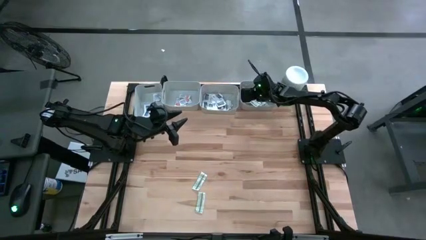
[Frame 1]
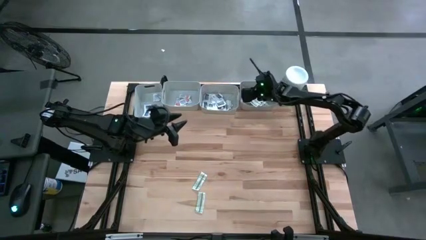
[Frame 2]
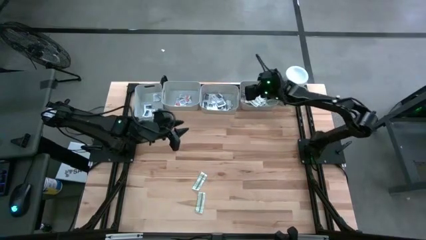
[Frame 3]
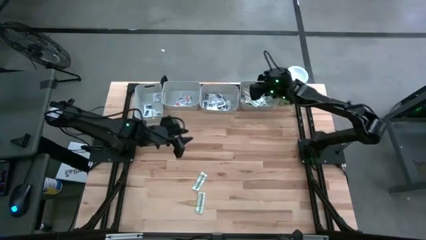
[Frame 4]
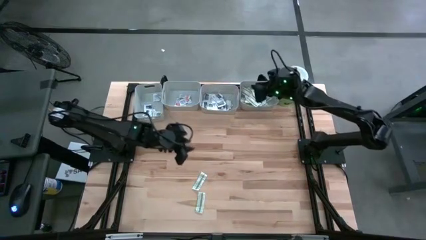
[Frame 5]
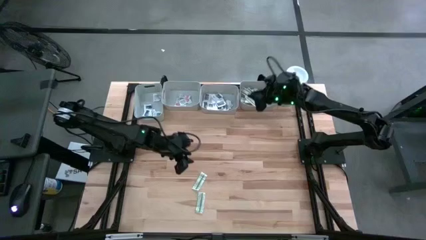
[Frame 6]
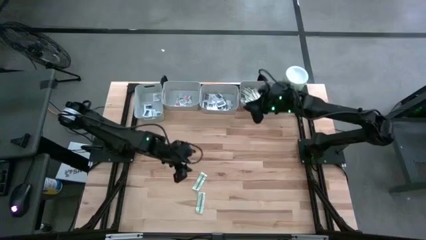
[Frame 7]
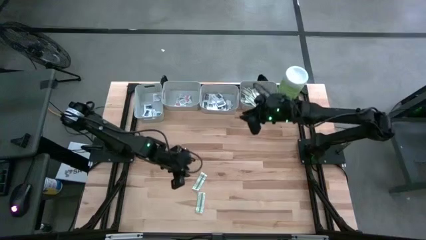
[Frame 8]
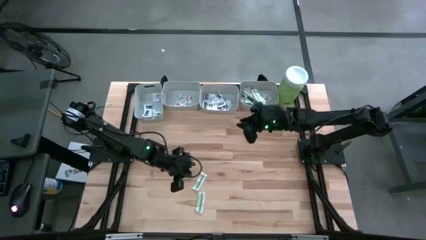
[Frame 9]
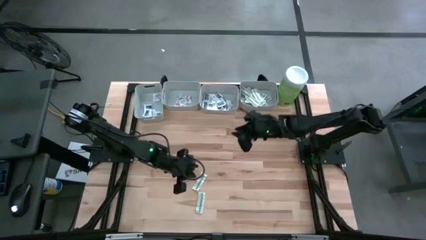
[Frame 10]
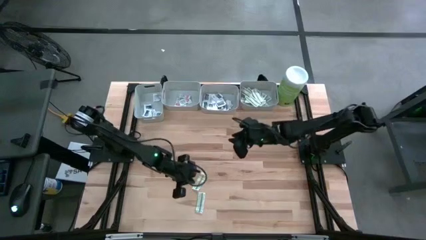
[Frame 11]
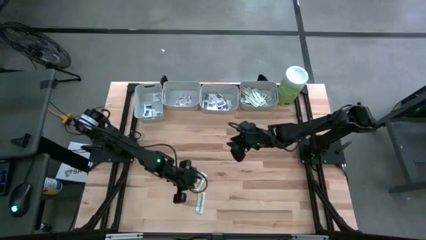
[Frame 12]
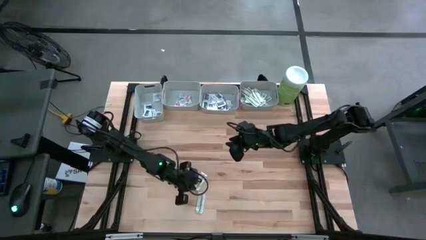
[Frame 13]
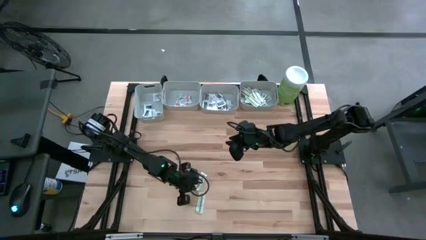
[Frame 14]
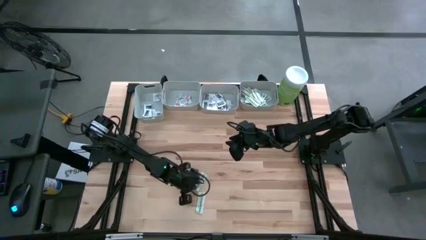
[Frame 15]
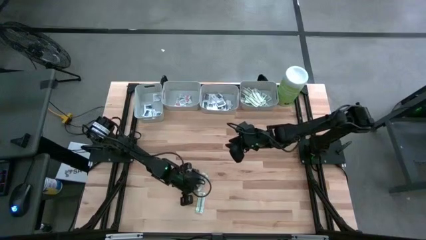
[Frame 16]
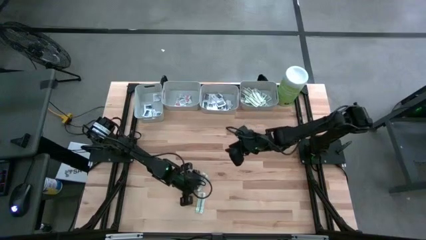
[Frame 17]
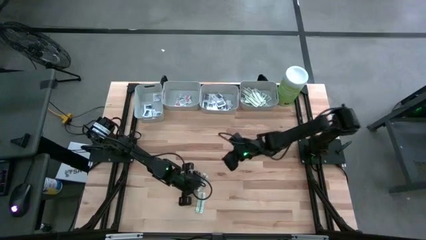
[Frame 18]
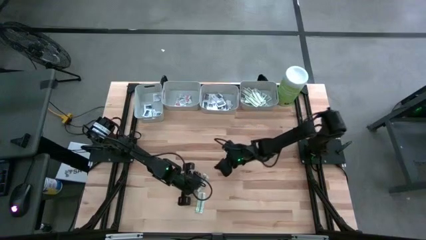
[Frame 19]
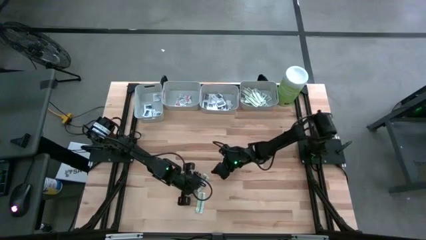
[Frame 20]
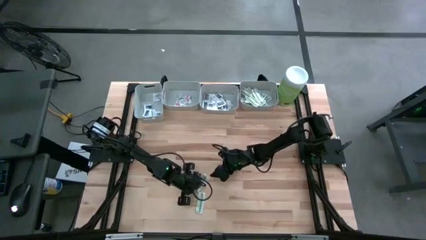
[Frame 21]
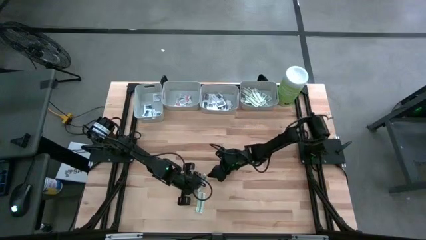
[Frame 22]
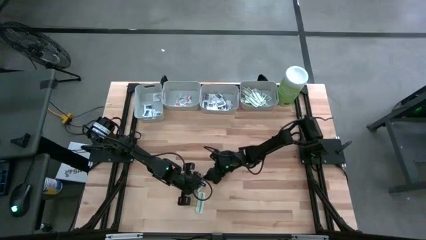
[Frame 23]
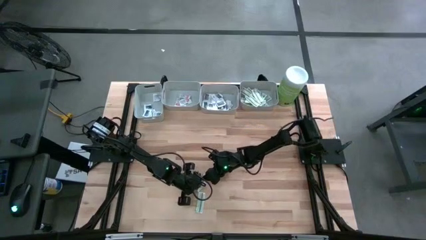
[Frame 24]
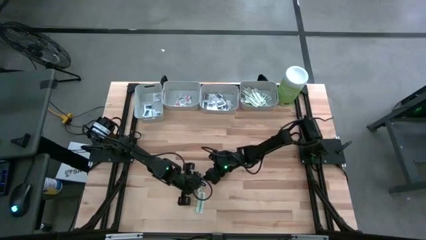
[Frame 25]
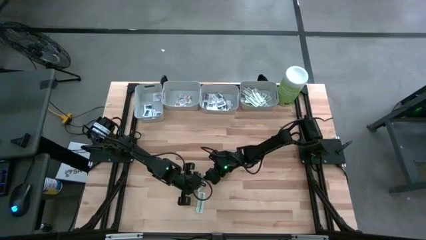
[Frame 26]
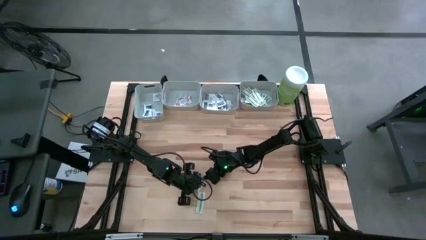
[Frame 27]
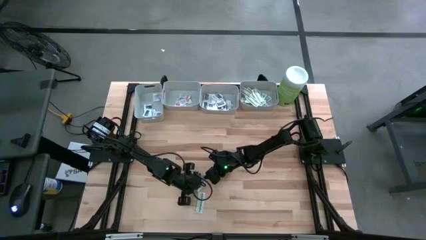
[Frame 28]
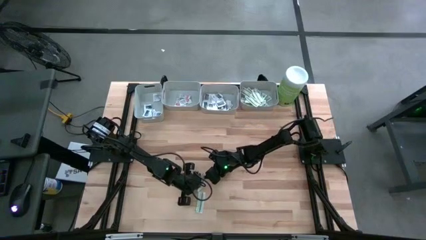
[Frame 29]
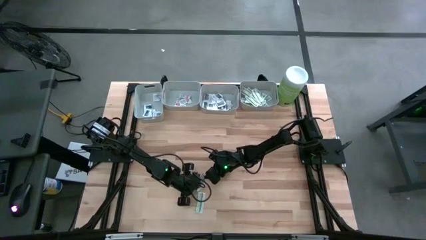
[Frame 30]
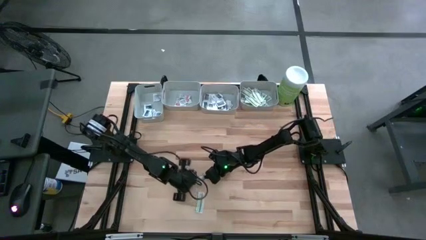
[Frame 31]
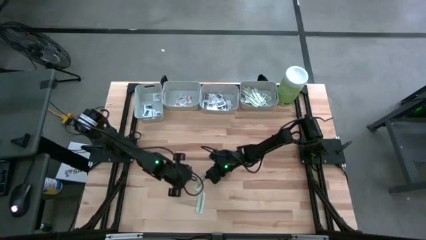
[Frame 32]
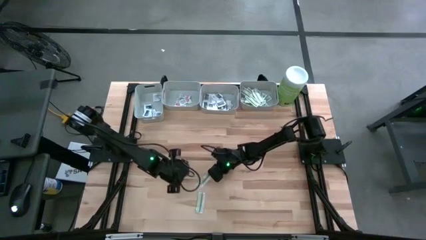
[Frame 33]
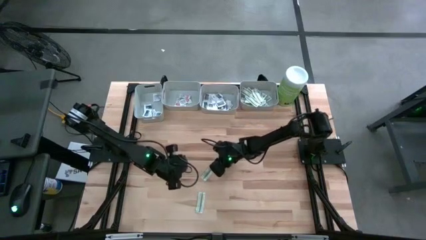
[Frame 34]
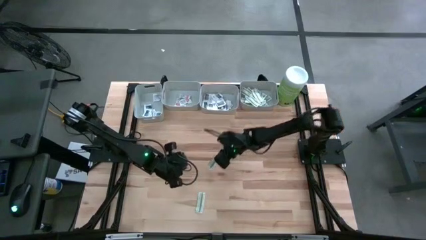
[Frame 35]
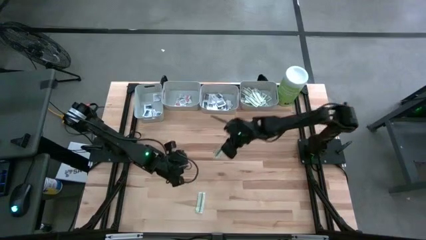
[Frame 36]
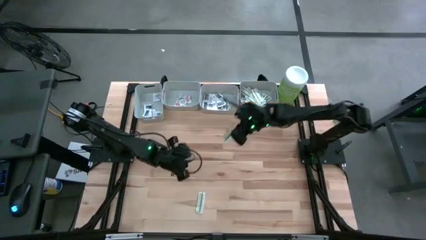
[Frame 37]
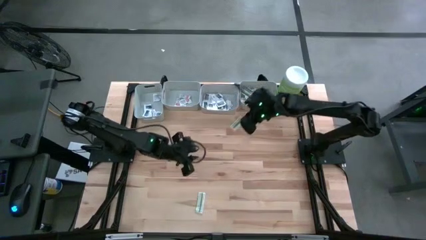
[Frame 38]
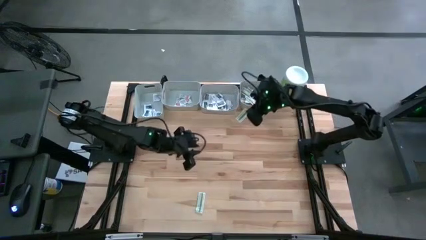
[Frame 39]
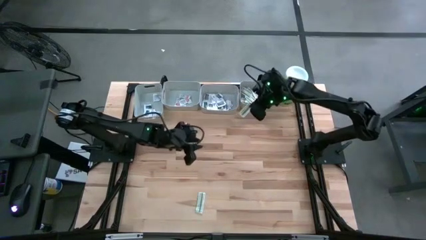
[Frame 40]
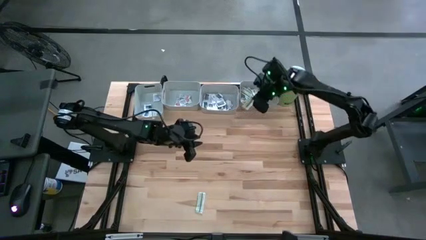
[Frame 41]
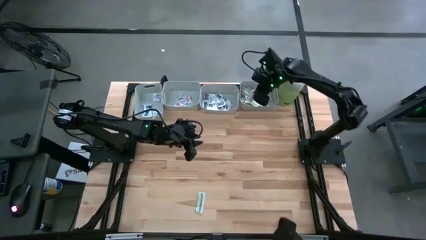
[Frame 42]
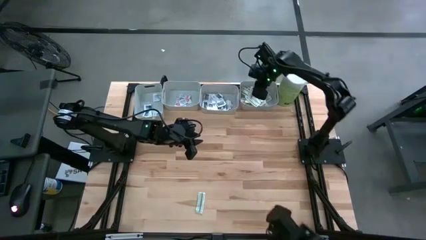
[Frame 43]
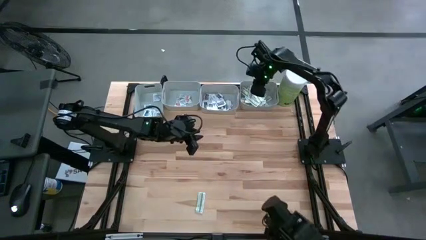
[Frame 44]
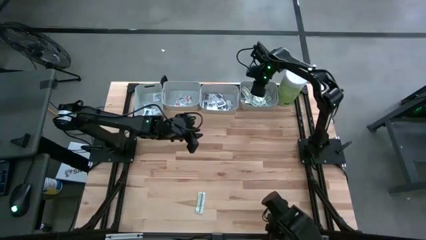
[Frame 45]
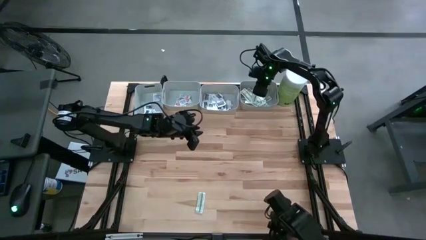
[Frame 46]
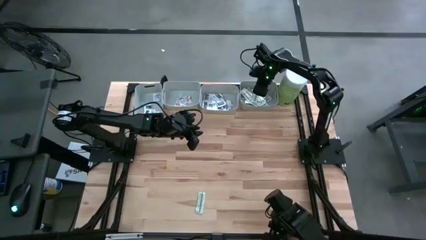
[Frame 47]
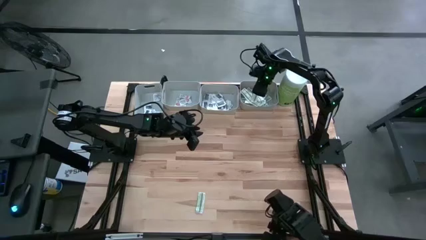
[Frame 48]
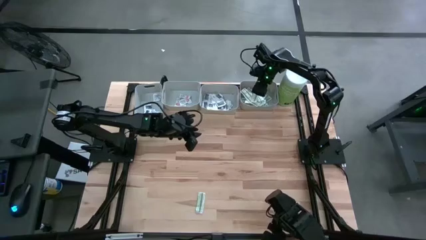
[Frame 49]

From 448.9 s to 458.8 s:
Task: Pick & Place First Aid Supplies
Put the green bandage into the right gray bin

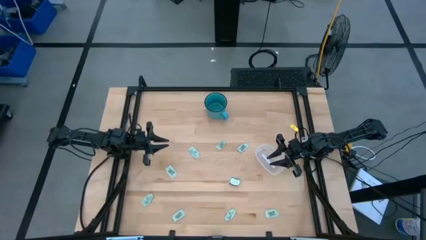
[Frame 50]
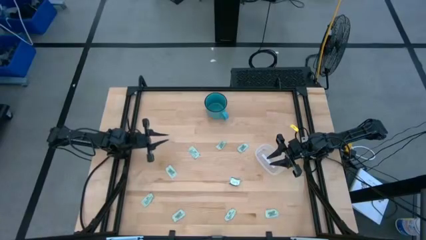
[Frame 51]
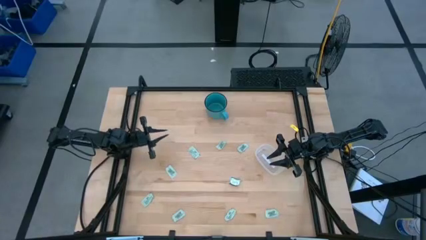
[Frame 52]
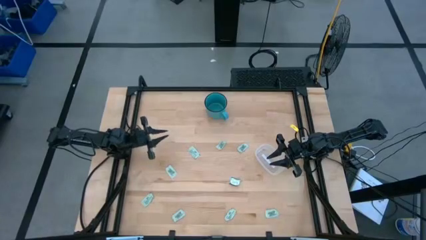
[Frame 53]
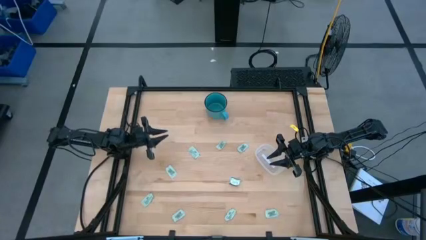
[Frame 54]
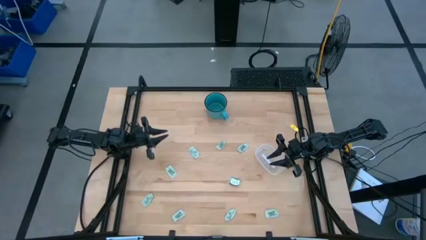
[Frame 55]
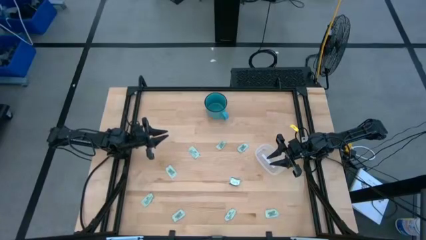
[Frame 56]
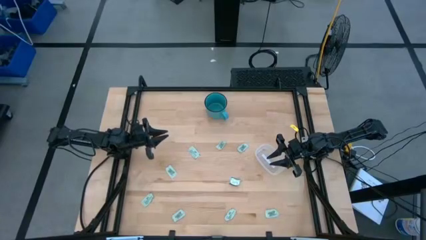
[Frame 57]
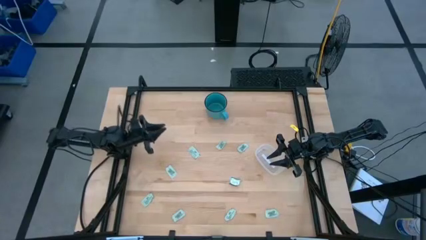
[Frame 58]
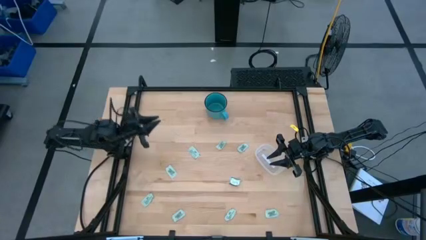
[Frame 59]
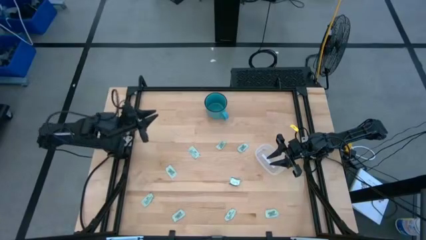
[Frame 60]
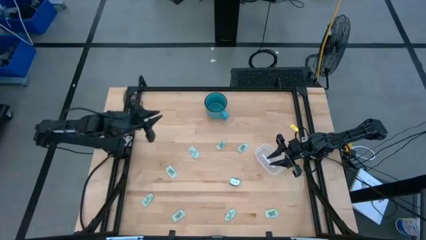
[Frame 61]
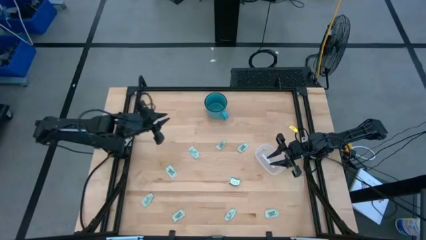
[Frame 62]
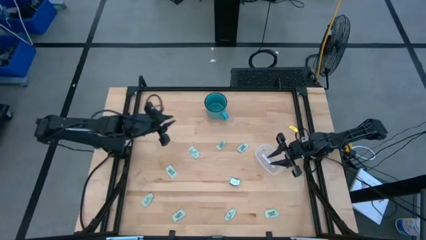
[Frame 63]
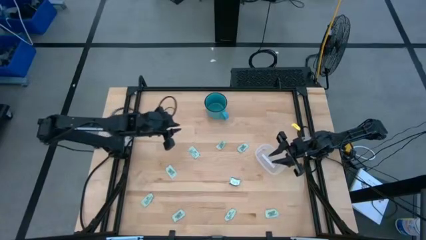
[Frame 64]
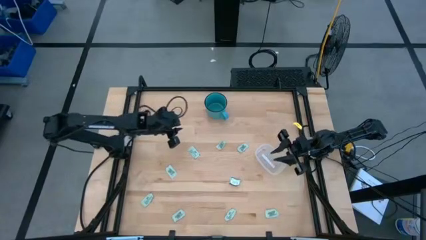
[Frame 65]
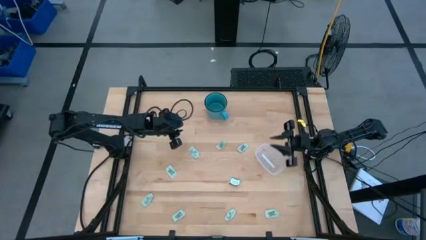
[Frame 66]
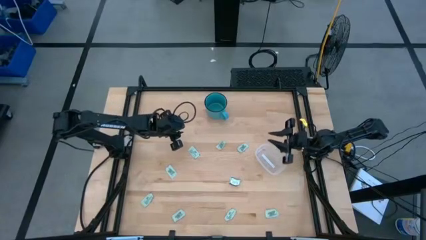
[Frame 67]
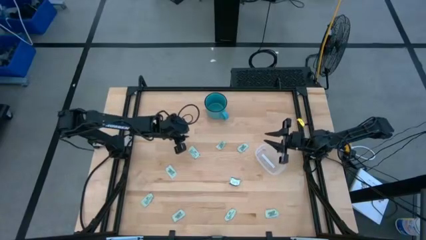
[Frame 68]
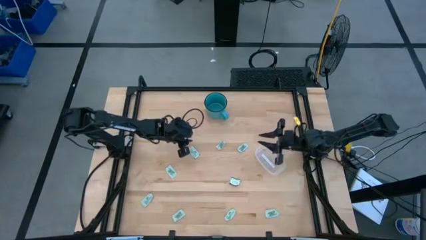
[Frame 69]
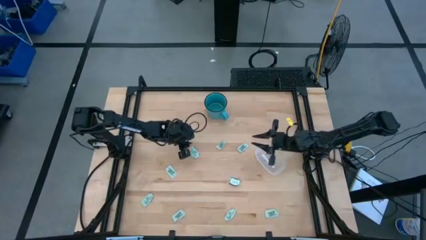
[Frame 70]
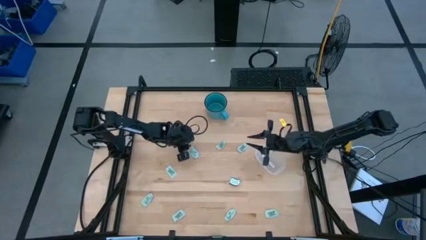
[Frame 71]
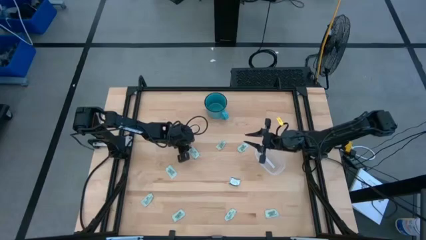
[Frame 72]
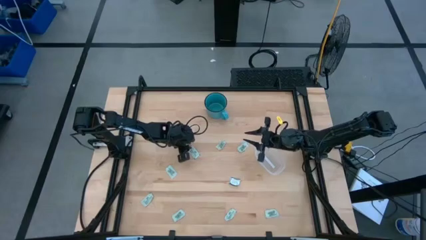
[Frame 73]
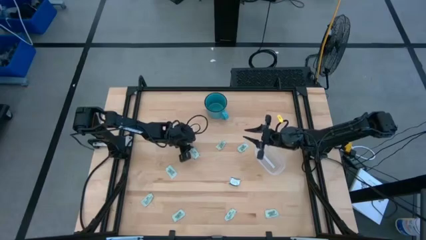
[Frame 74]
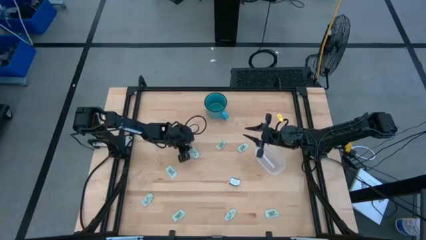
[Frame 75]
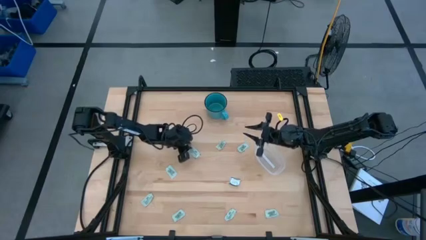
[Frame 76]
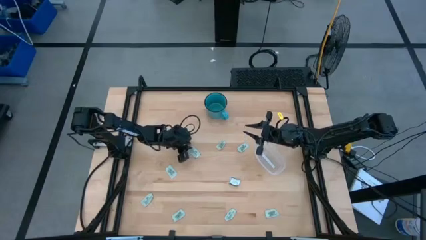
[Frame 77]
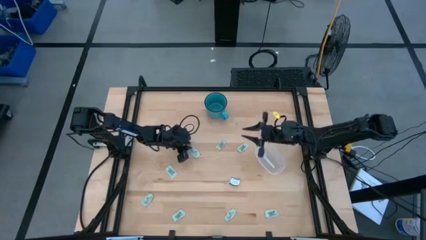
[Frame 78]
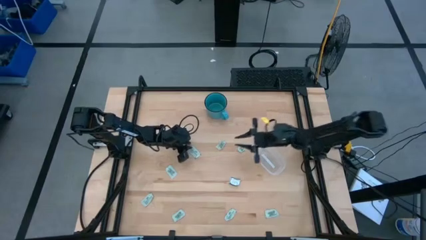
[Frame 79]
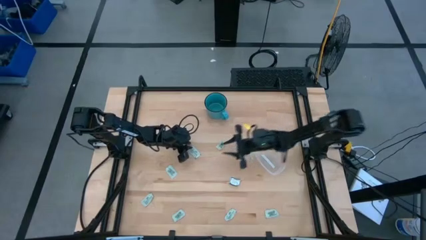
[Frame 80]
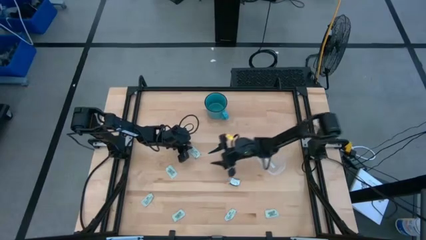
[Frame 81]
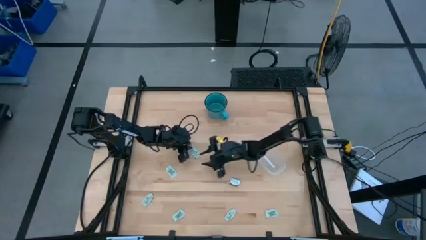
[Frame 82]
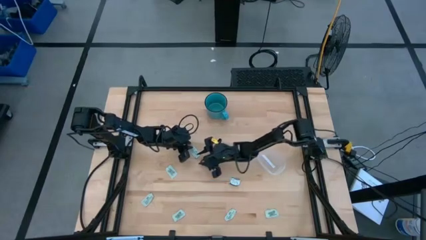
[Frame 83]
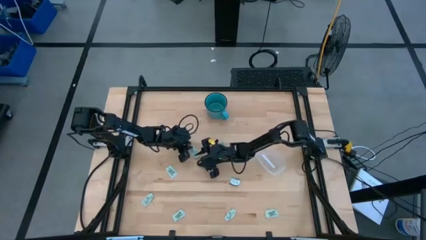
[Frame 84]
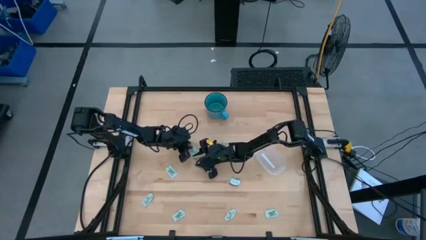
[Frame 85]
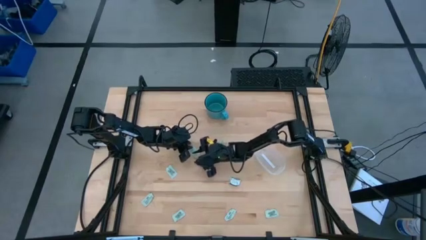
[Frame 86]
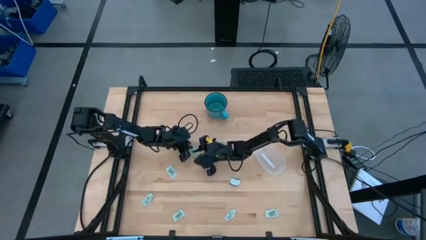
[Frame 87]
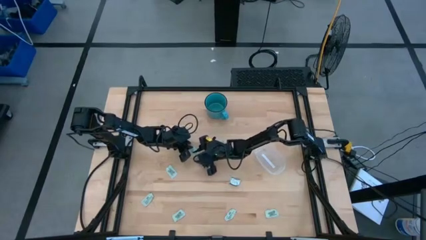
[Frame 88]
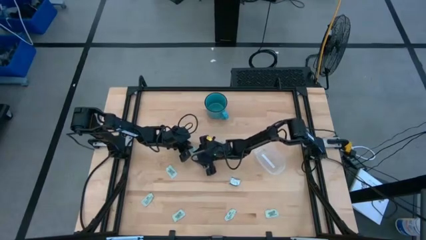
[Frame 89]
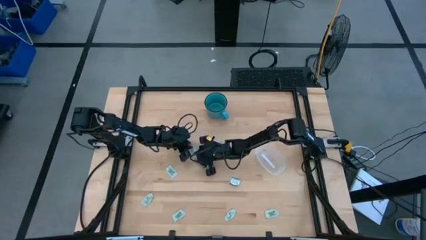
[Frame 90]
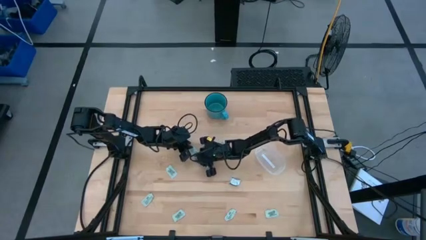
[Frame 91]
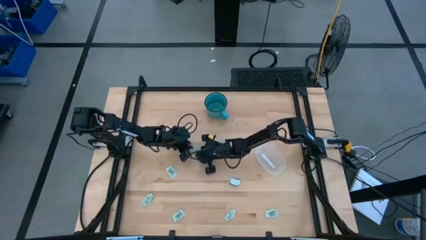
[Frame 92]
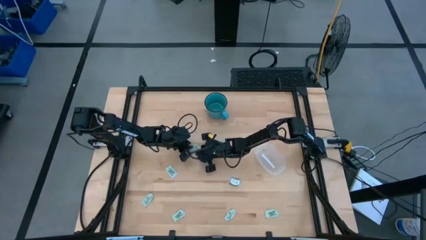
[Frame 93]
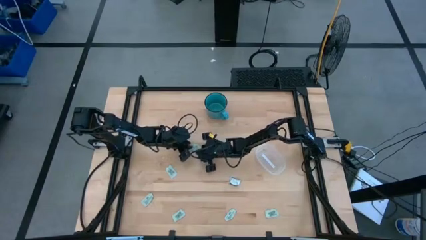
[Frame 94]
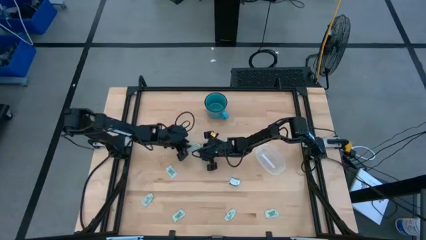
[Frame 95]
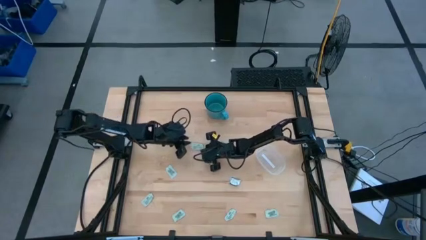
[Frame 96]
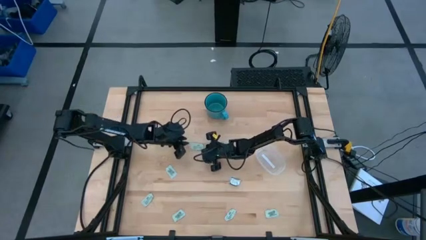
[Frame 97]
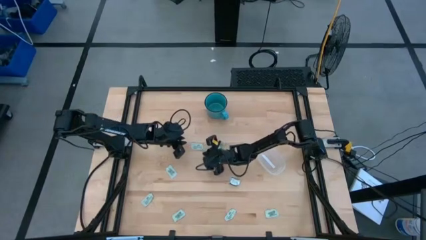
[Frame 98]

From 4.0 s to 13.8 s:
Task: Pick and place Stevia / Truvia into bins
Put the white stevia packet into the transparent container
